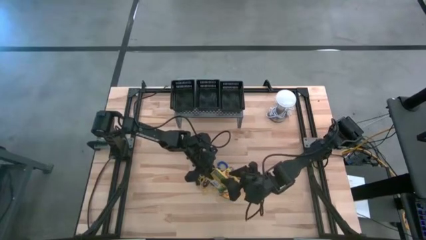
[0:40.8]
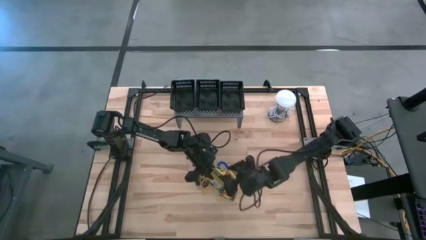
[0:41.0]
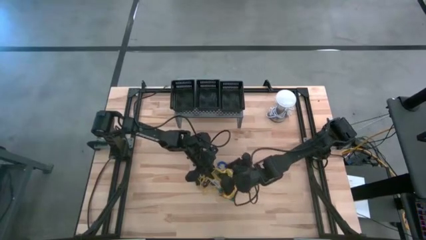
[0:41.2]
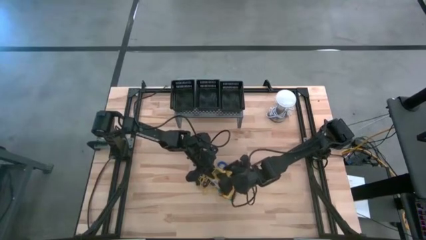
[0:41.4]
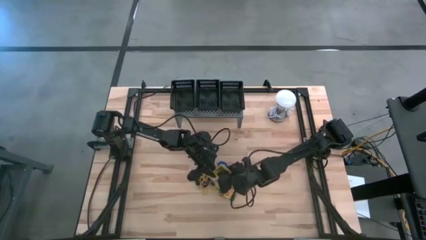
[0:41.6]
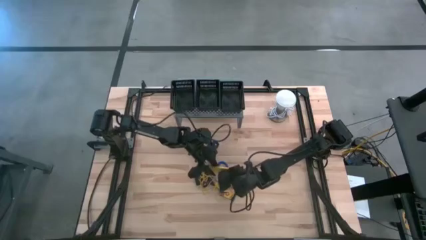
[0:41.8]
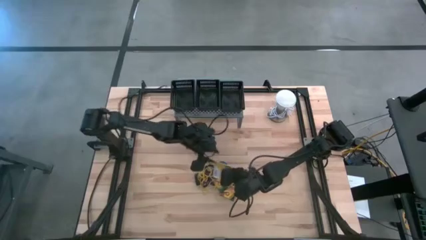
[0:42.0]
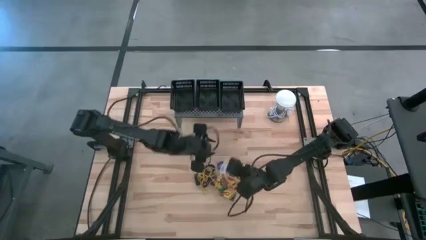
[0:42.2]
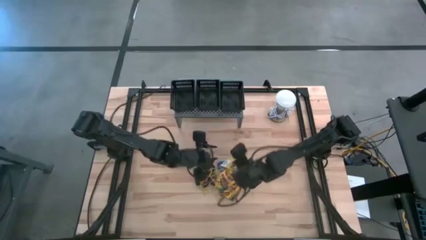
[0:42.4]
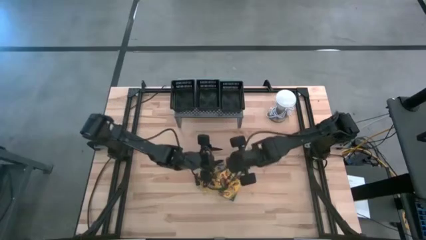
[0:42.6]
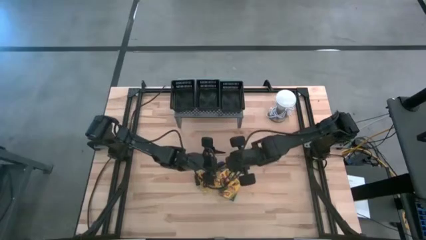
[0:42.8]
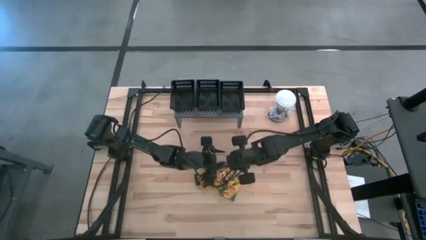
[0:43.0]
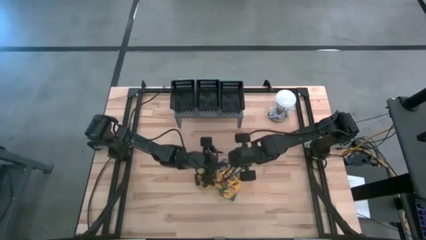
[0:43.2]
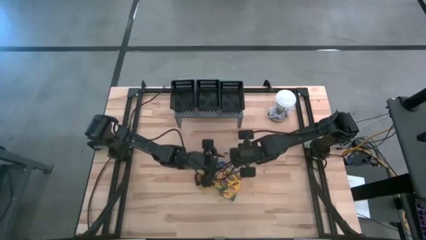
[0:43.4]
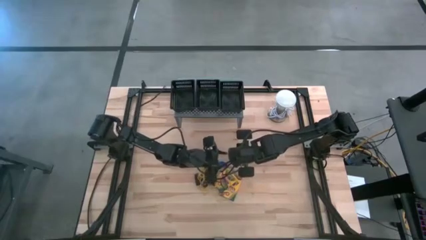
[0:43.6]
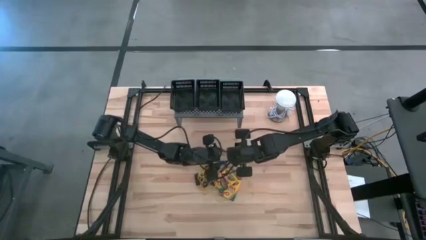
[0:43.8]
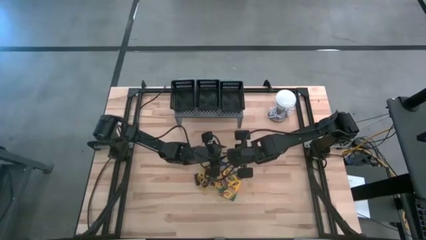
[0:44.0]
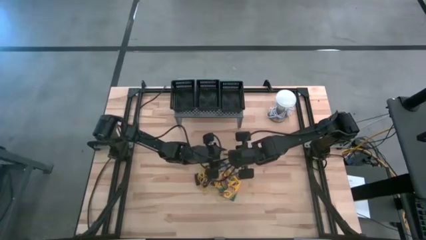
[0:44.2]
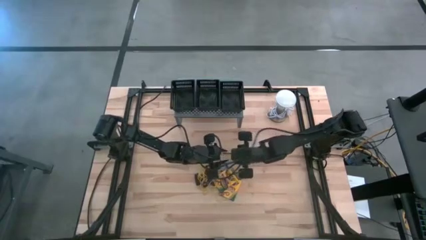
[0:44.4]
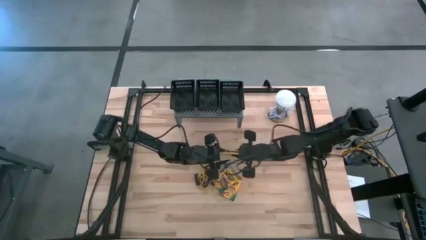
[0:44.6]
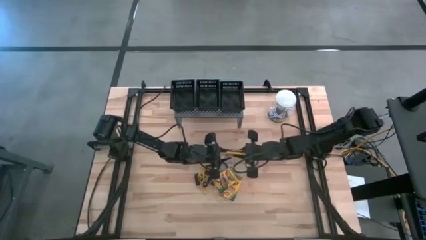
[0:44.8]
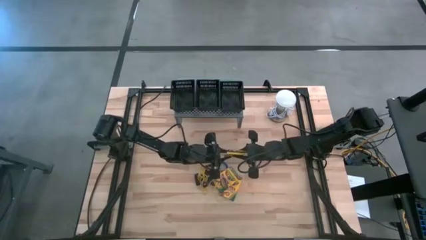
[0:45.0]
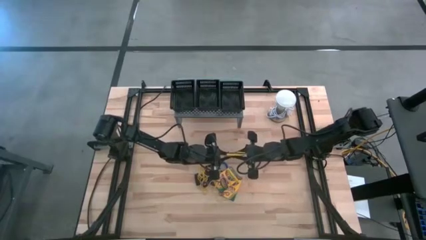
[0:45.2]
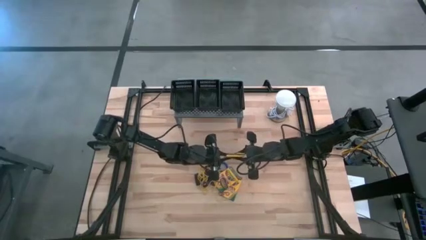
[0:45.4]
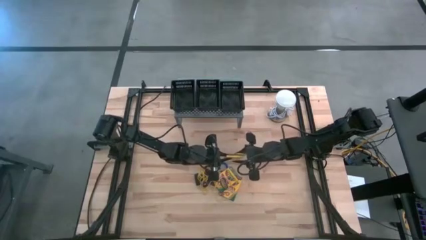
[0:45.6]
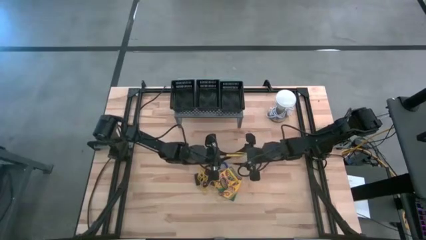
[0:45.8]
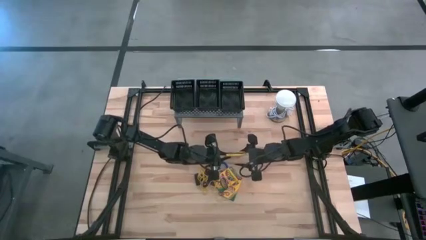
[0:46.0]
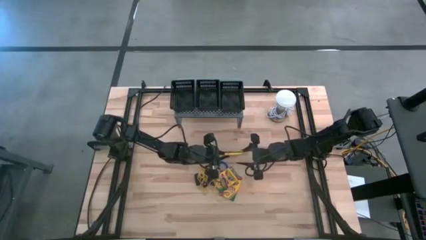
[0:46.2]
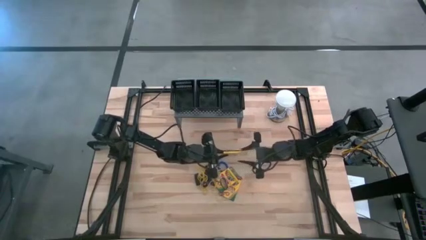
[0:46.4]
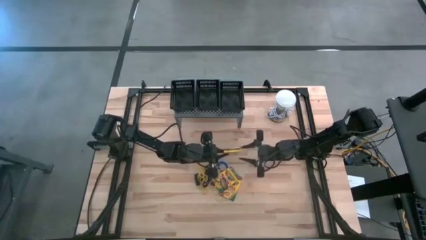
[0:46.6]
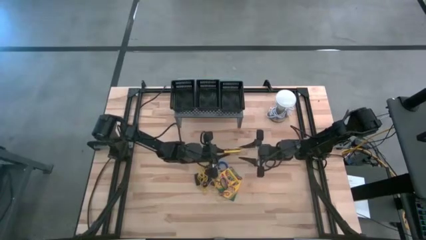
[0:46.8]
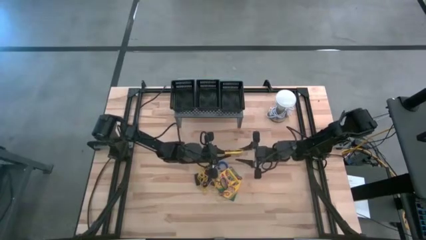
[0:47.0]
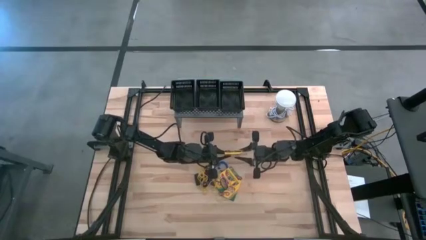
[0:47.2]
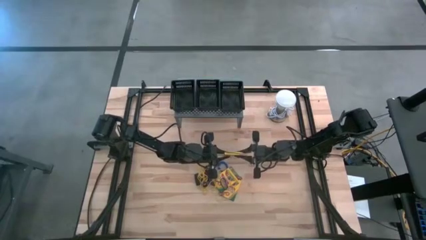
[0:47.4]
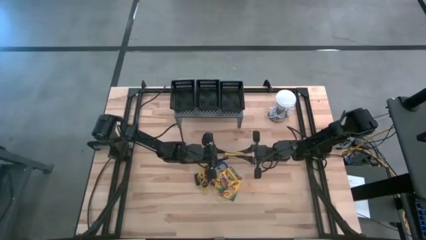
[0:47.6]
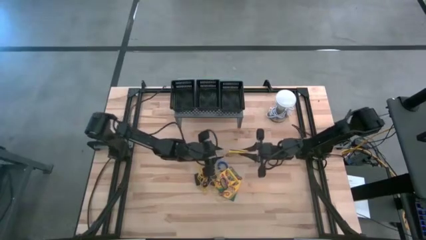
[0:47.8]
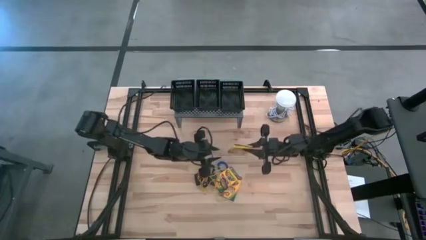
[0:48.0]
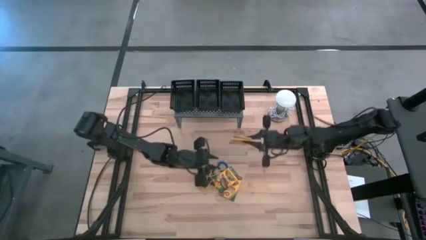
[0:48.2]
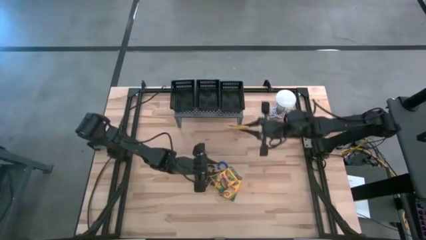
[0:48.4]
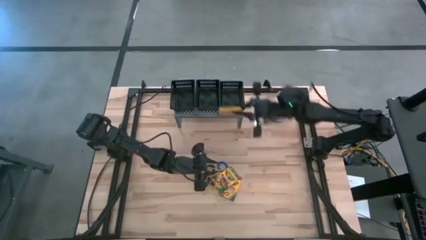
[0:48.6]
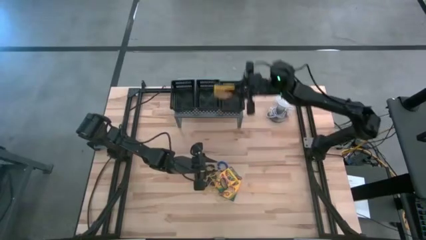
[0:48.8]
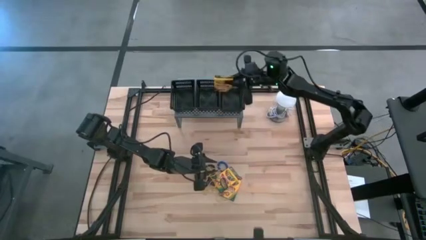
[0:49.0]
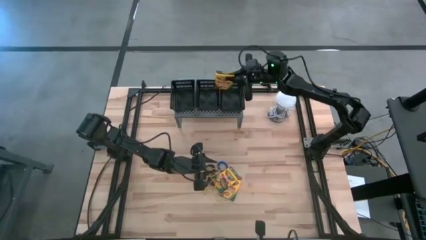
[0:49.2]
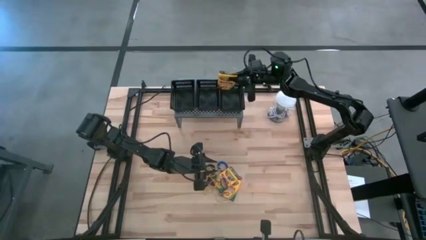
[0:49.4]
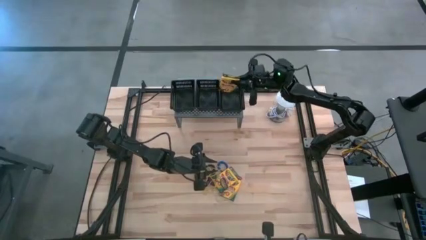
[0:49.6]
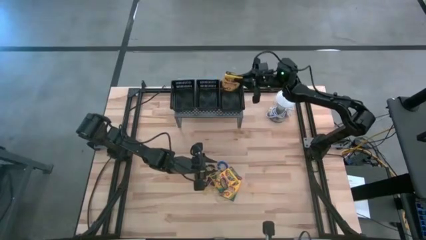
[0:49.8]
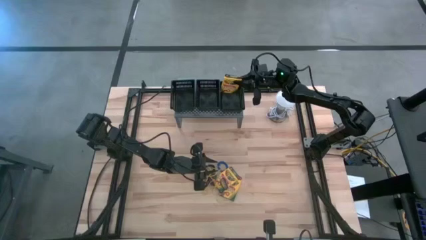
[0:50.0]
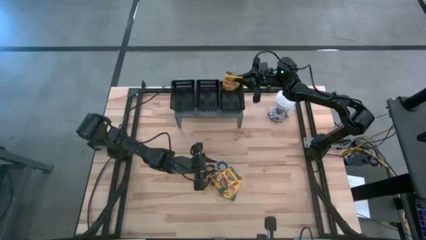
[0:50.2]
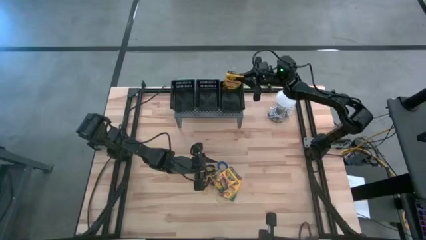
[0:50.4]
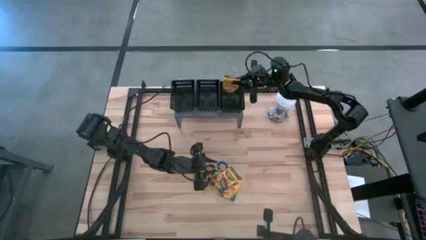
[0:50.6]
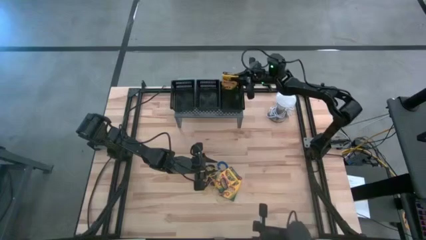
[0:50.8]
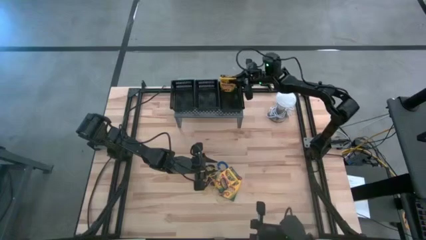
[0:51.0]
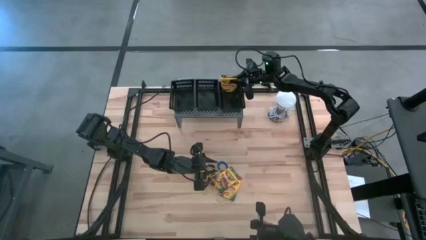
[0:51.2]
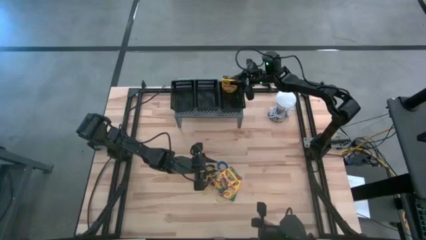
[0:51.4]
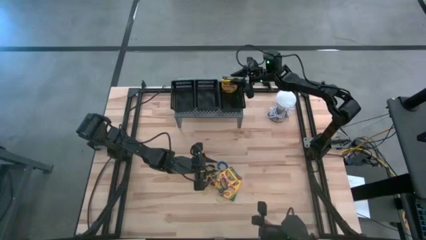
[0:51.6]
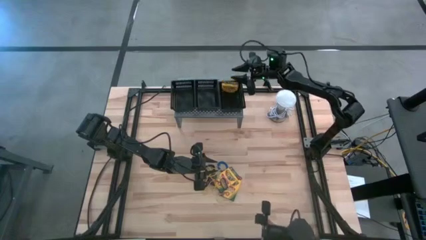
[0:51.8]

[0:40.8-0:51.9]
Task: Pick & Place Office Desk Supplies
Put the crayon box into the right black bin on the shelf

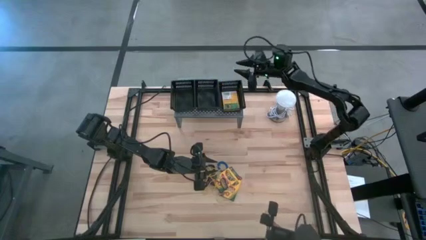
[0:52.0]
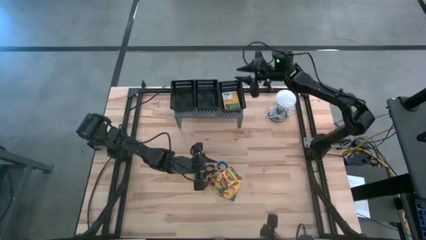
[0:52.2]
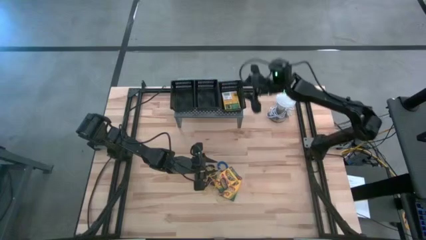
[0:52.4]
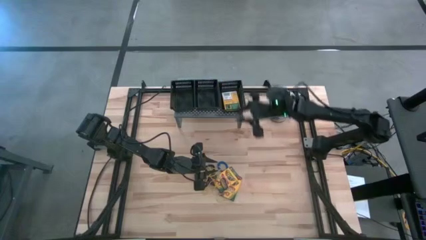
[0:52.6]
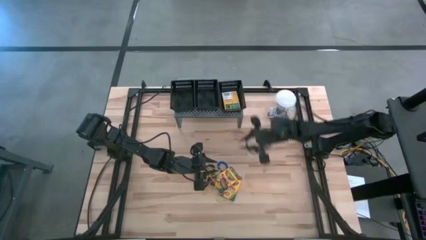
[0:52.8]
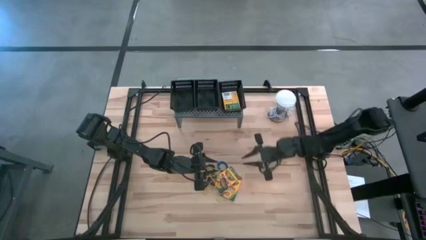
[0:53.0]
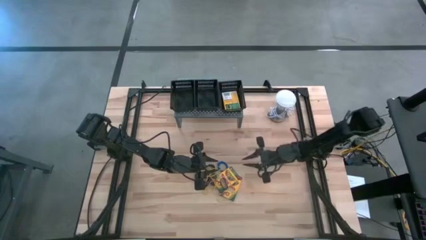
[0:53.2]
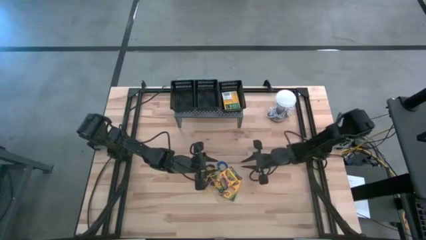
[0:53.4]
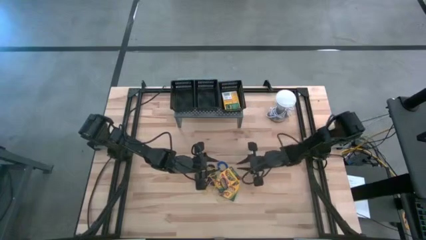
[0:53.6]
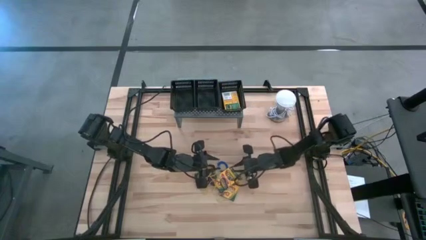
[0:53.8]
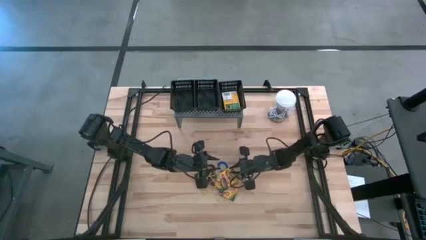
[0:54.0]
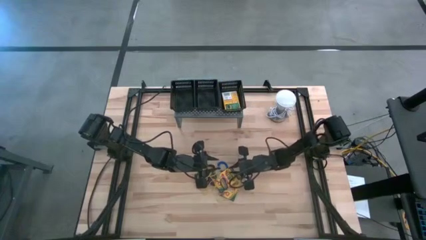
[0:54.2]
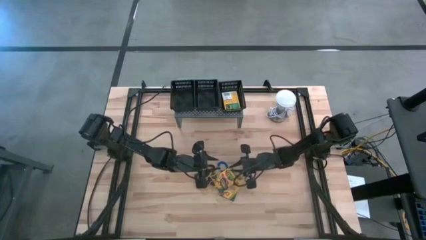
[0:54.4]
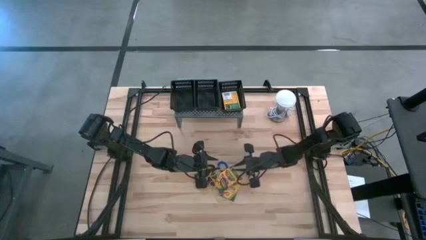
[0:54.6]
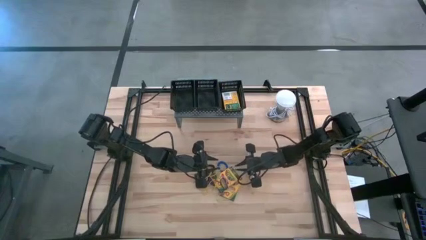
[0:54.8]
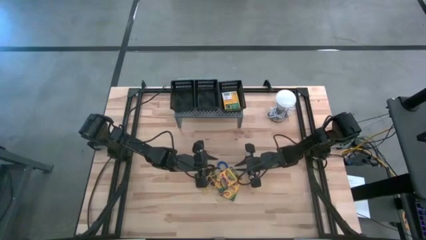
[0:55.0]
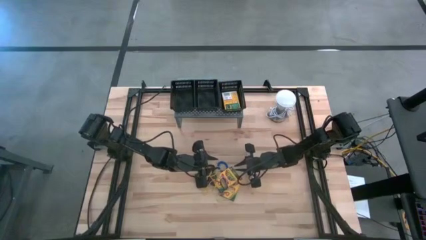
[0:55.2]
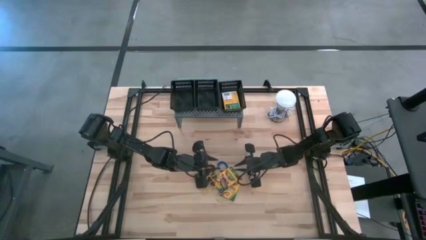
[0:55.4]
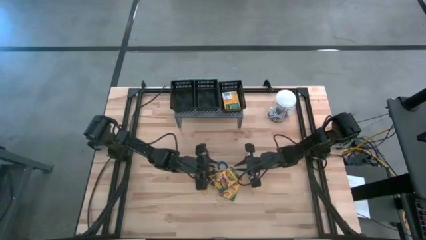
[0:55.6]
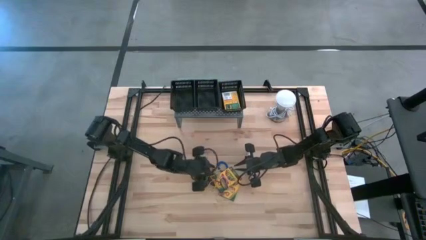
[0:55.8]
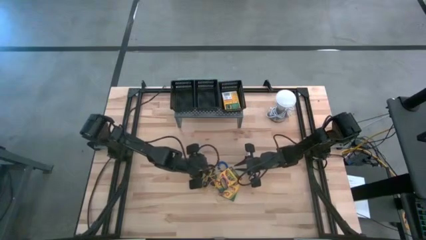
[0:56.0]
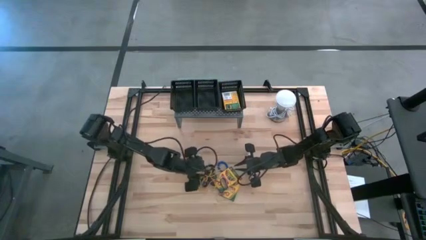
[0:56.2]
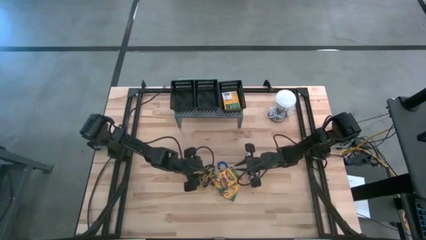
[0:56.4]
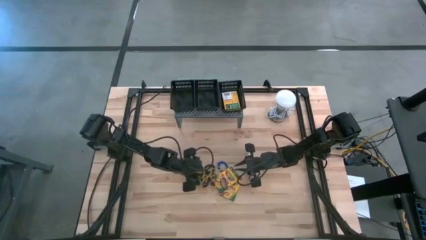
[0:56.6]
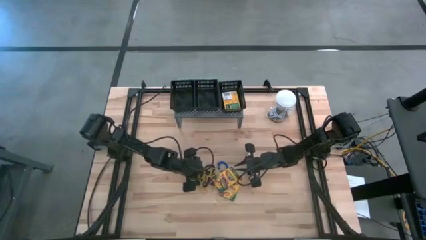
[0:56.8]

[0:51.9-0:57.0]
Put the yellow rubberband into the middle black bin on the shelf
